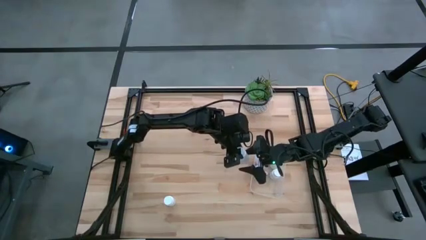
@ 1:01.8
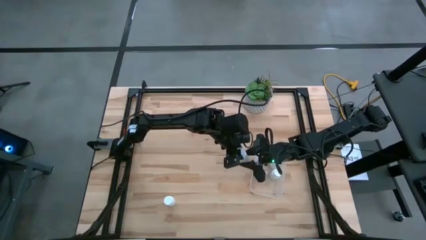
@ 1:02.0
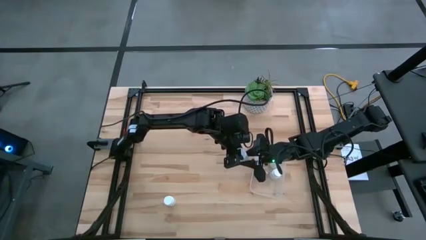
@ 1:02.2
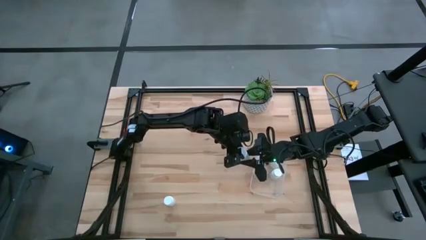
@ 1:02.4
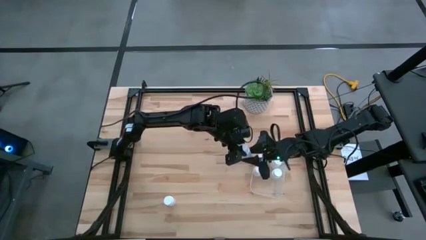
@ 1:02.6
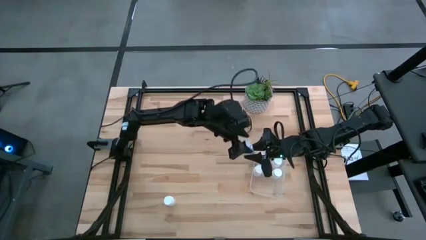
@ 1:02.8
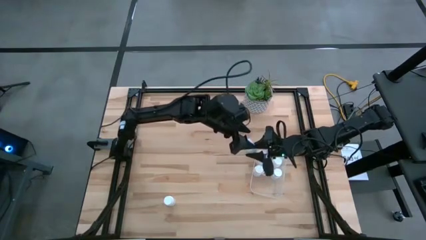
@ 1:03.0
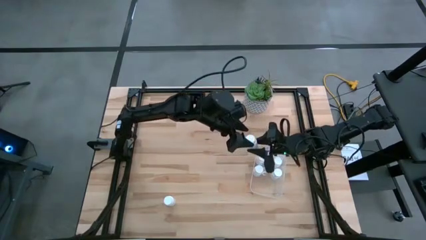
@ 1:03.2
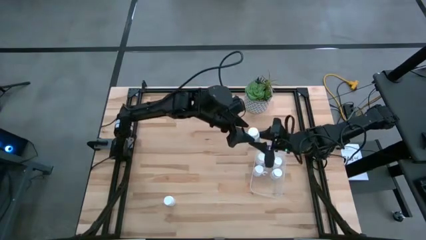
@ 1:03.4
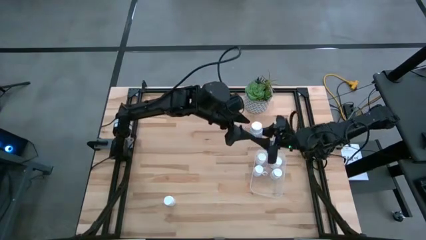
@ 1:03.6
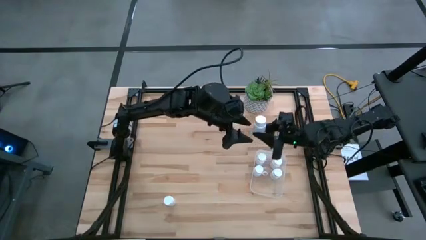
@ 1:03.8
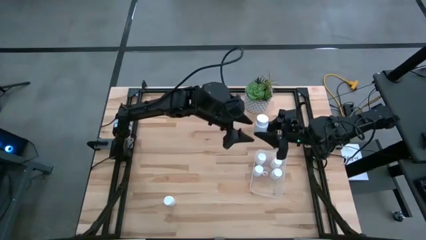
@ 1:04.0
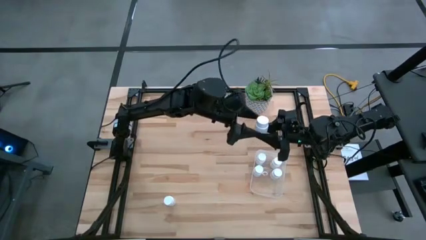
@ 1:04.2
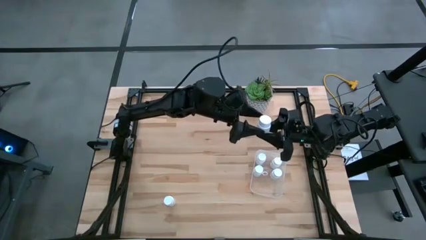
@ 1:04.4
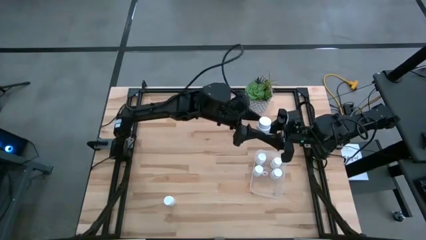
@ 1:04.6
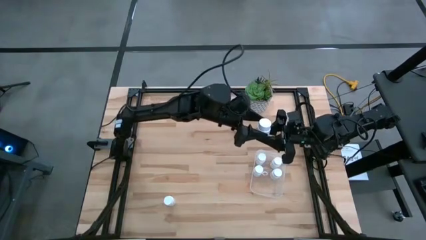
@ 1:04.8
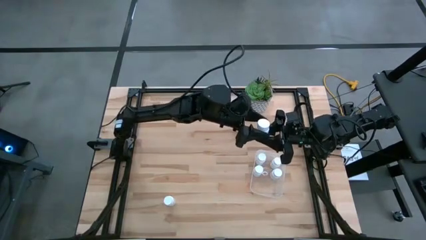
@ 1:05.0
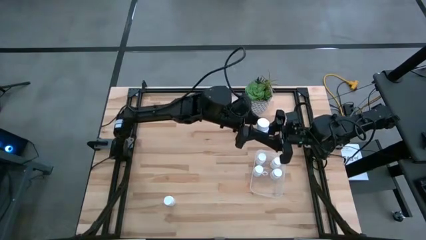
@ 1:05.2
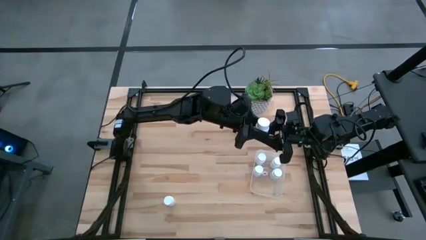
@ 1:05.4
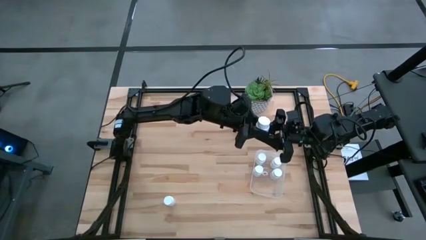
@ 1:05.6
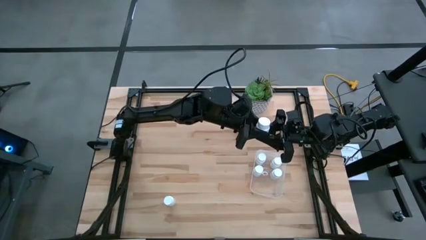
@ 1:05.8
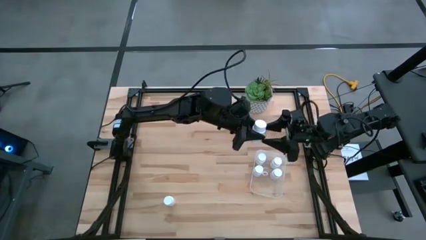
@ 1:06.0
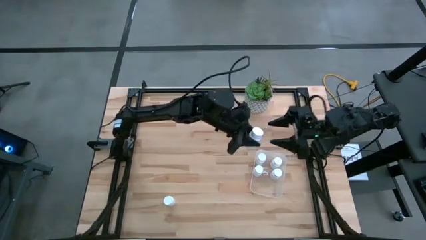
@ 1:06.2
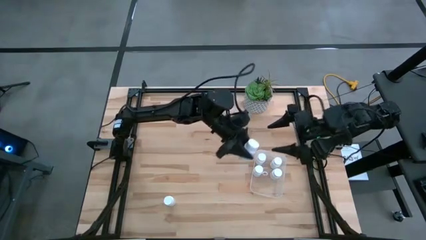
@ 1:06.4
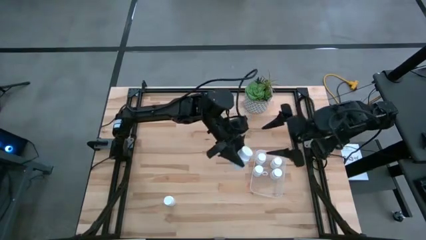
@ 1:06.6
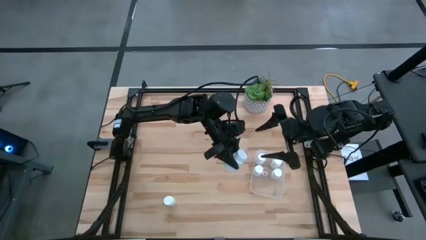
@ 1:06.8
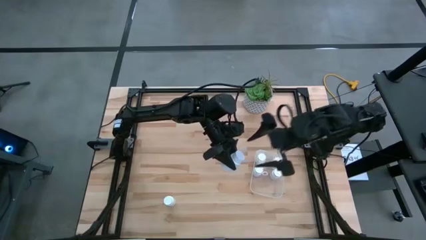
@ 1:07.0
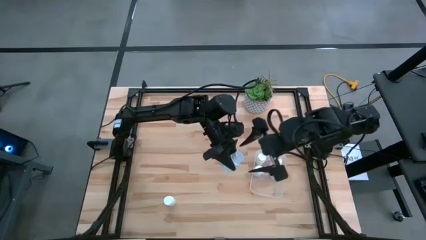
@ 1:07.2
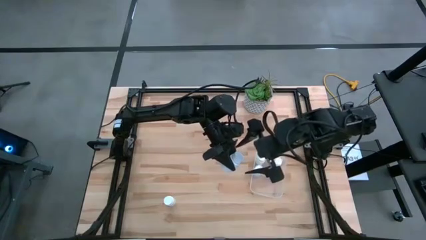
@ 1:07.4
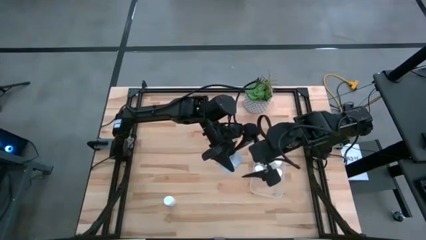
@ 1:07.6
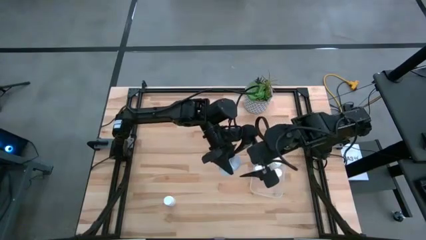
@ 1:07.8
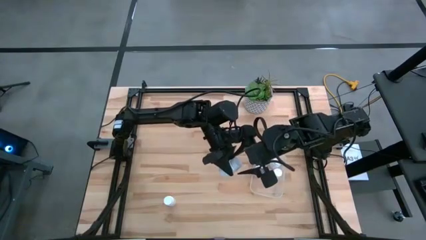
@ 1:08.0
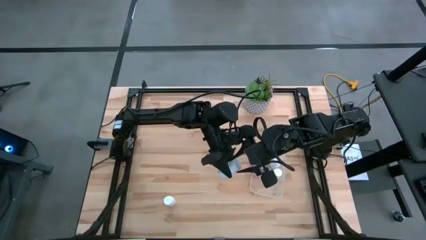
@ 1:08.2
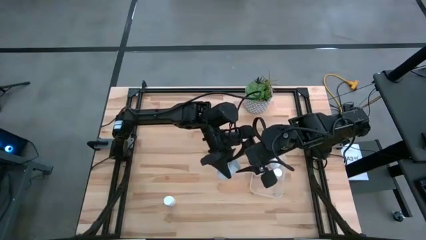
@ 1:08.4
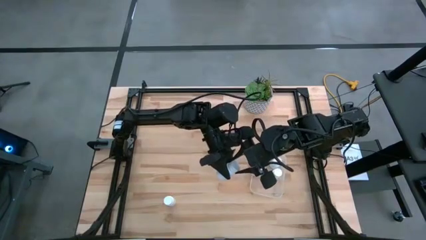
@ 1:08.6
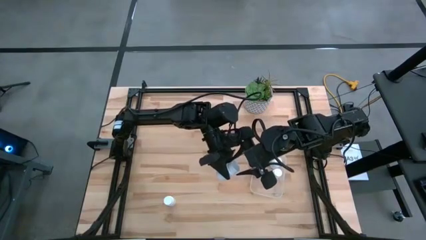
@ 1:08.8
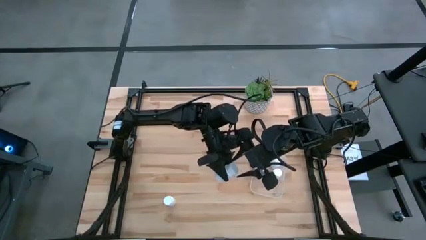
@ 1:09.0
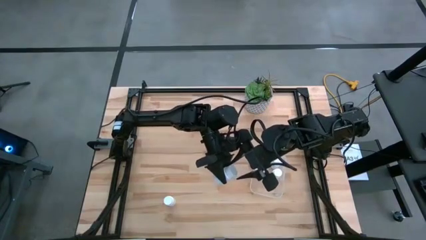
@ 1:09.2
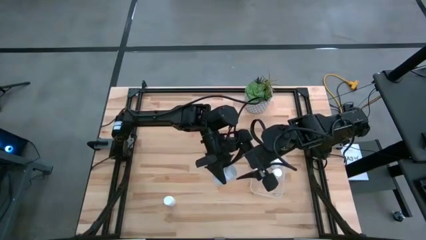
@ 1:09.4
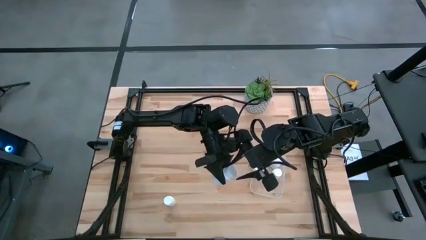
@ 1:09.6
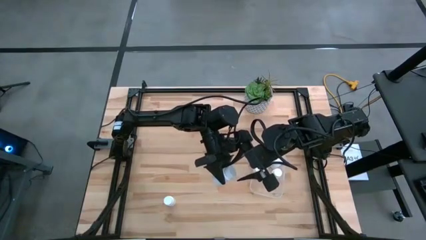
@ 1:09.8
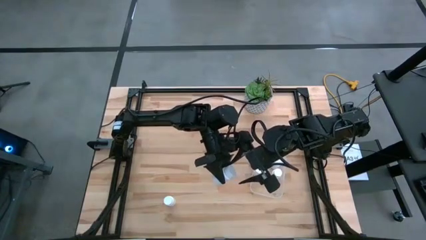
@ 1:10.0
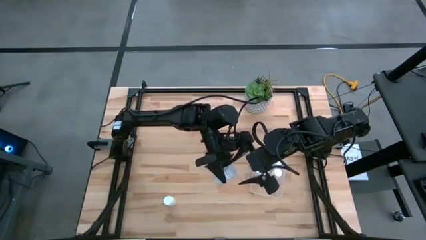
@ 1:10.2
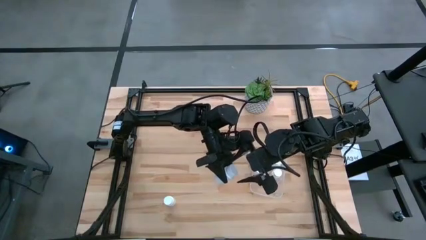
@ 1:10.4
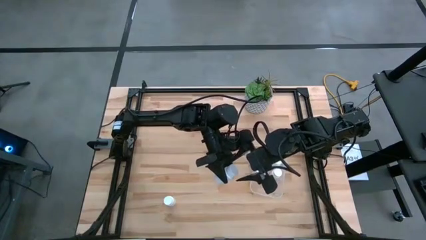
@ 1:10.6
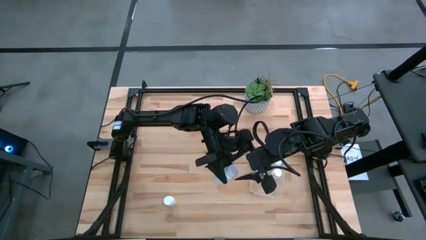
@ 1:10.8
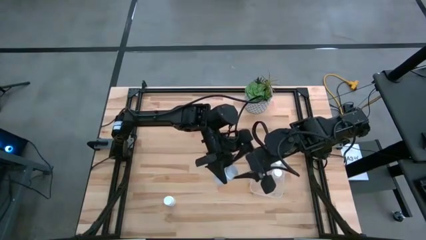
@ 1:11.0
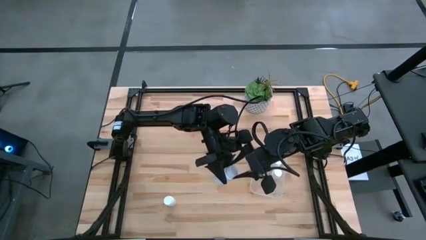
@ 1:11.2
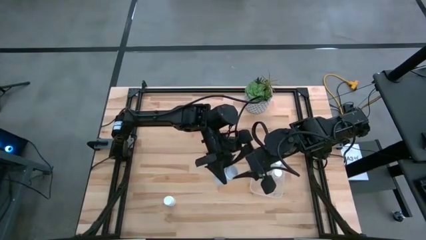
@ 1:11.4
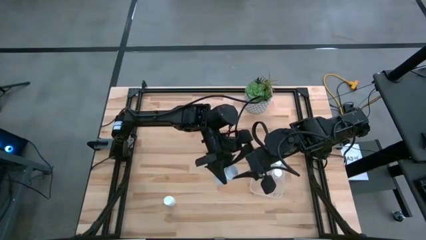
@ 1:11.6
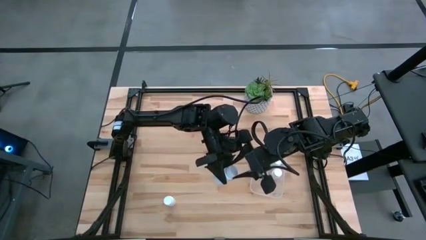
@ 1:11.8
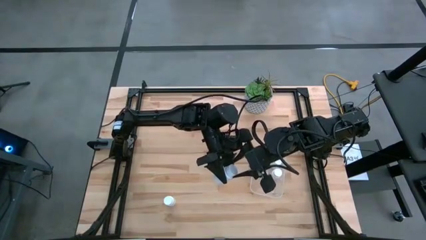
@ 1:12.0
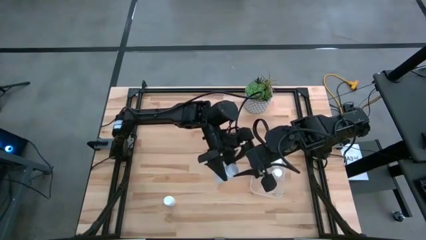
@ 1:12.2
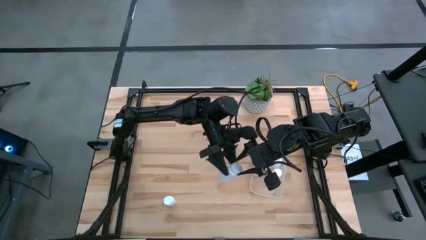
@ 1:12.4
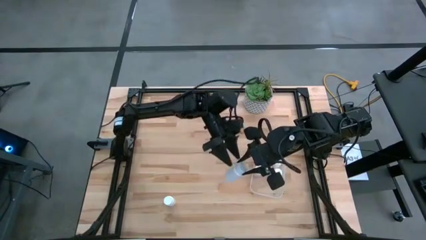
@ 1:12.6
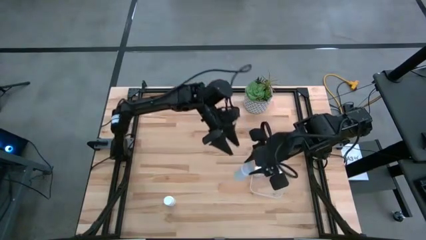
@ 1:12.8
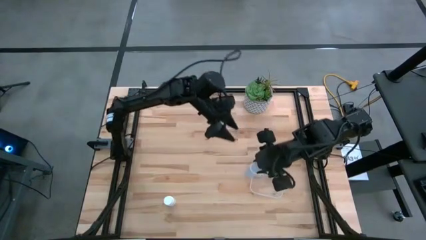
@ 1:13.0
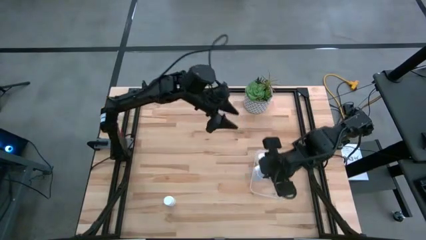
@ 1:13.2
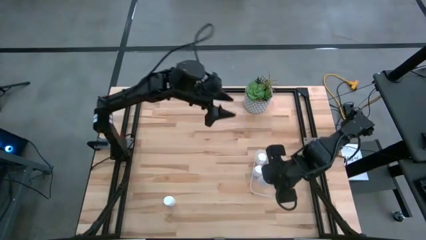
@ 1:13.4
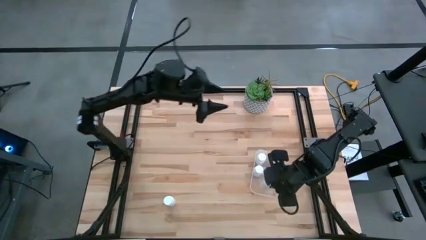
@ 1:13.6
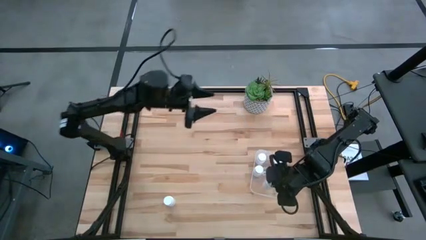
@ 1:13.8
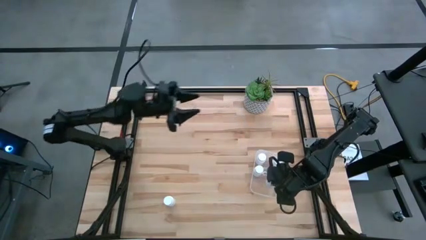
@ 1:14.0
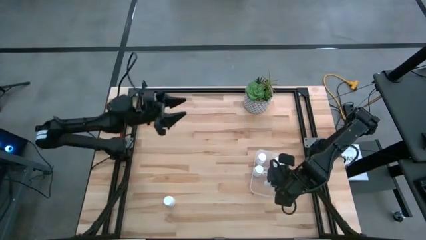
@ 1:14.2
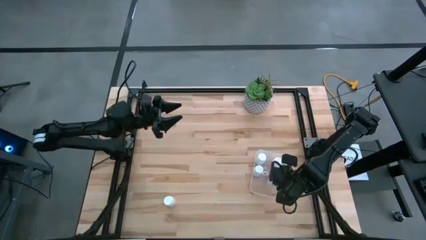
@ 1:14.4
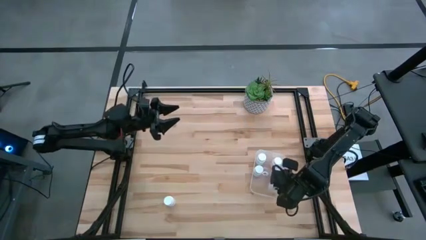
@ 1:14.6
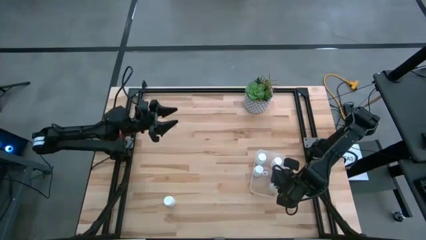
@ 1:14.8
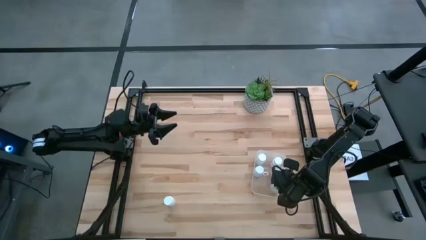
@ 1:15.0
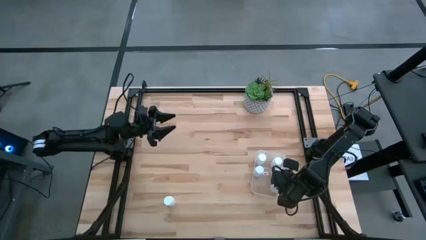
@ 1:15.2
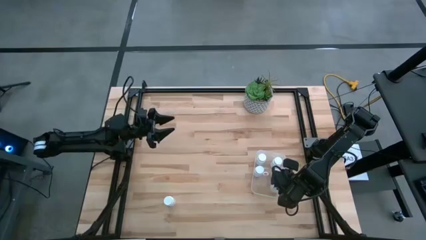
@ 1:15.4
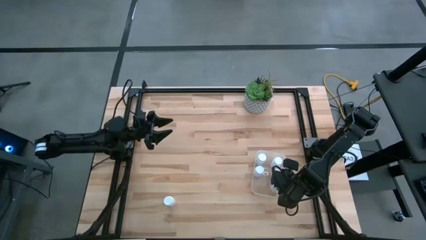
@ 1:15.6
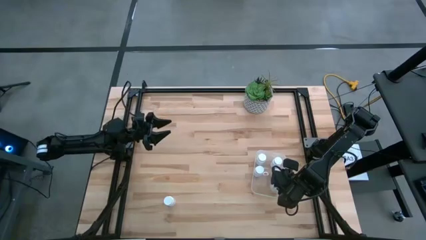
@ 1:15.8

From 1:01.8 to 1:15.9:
Task: Pick and place pill bottles into a basket
Put the white medicine bottle into the transparent bin
